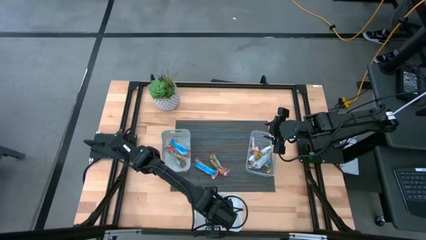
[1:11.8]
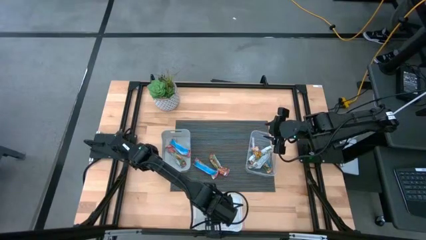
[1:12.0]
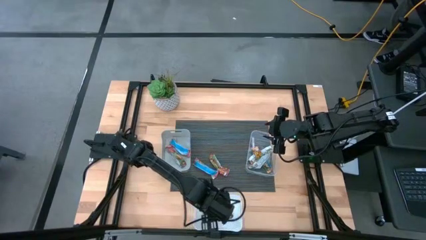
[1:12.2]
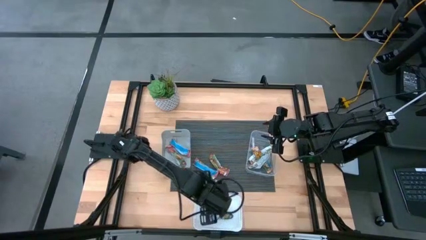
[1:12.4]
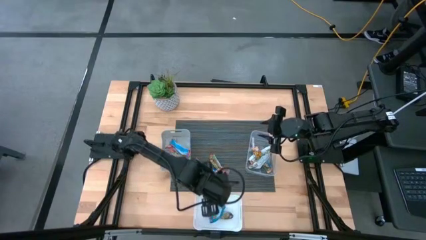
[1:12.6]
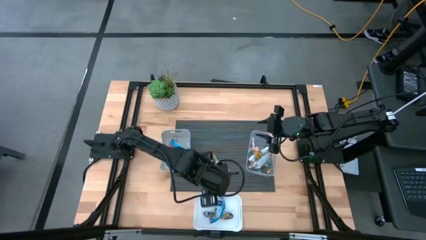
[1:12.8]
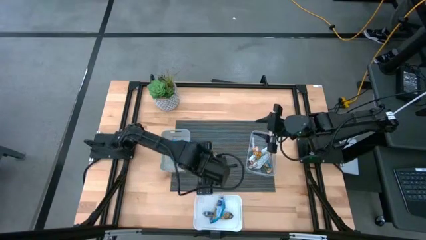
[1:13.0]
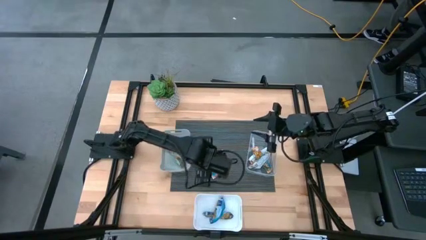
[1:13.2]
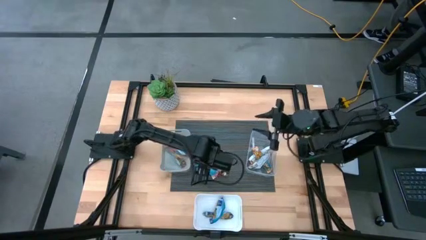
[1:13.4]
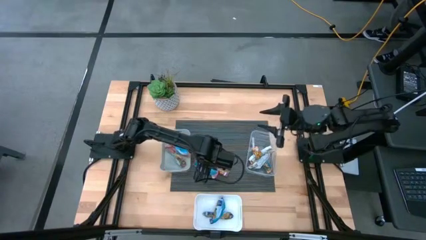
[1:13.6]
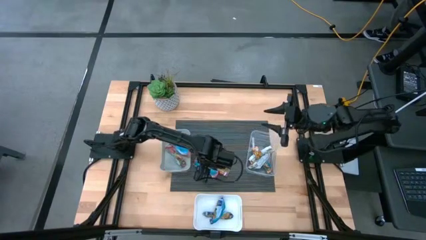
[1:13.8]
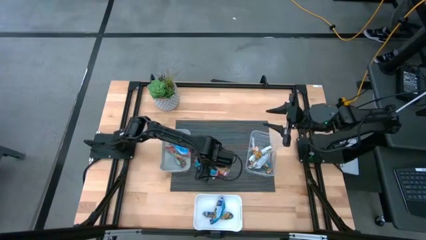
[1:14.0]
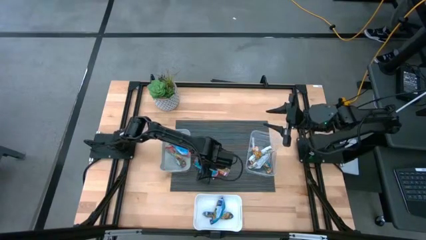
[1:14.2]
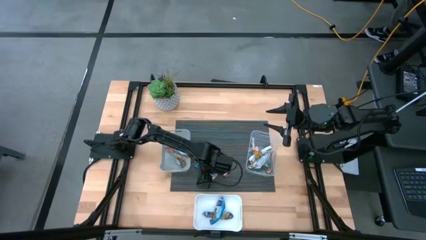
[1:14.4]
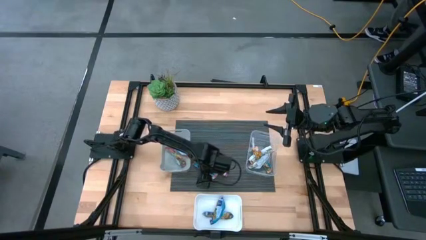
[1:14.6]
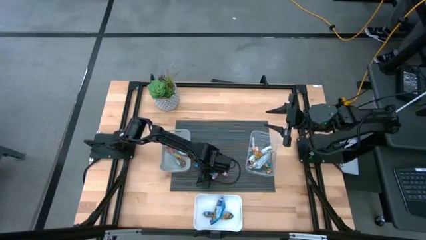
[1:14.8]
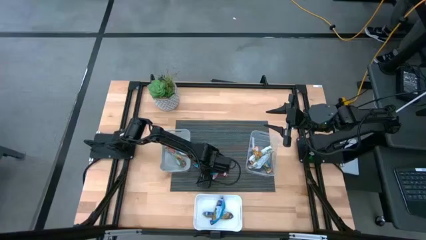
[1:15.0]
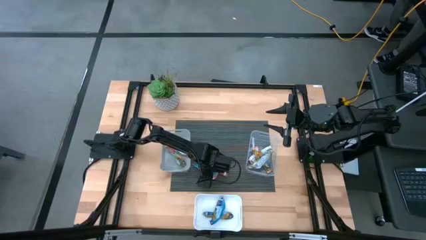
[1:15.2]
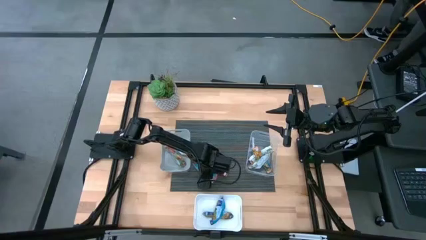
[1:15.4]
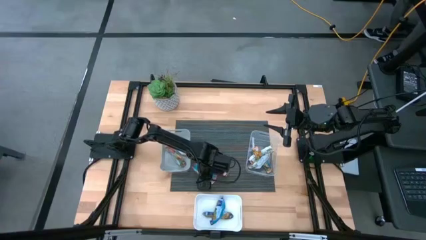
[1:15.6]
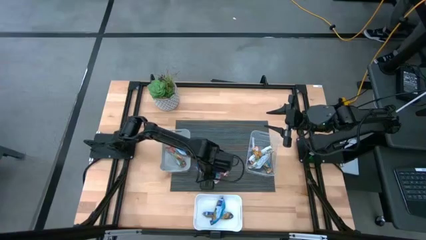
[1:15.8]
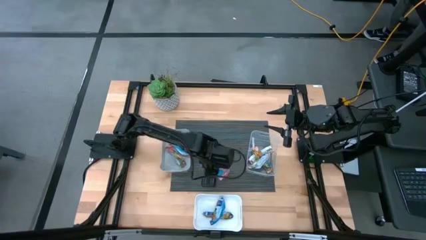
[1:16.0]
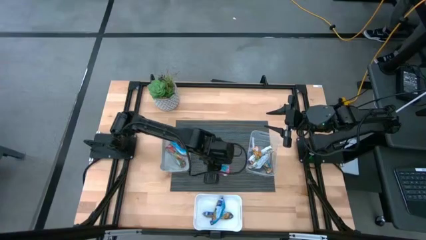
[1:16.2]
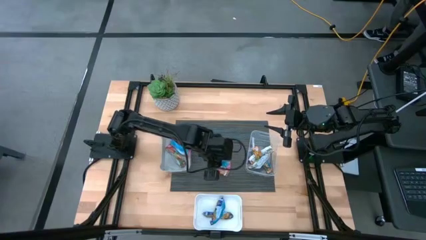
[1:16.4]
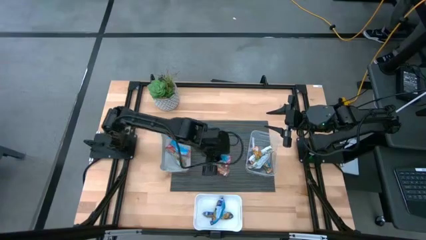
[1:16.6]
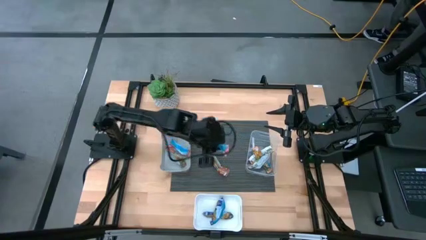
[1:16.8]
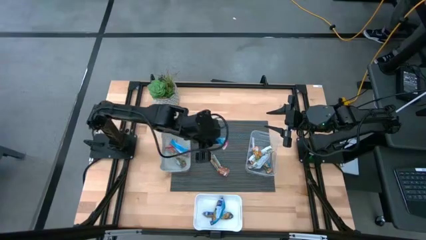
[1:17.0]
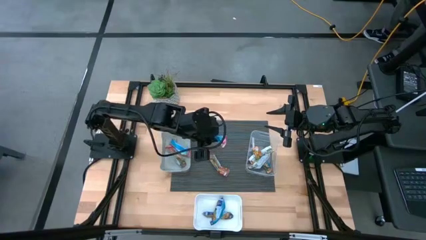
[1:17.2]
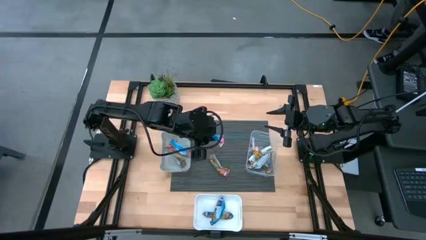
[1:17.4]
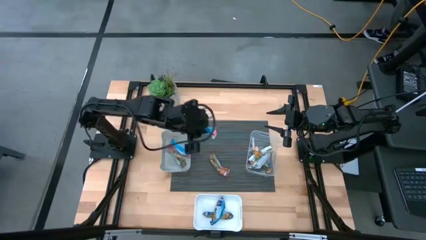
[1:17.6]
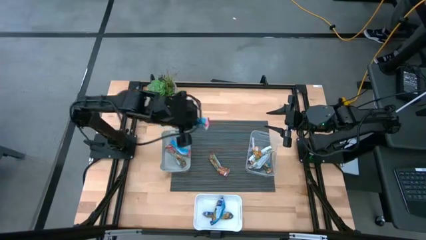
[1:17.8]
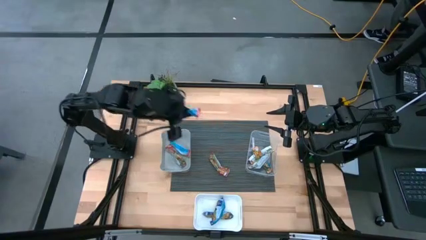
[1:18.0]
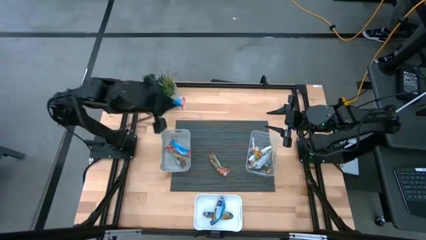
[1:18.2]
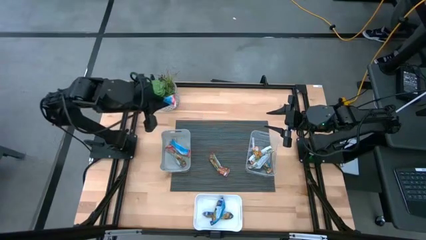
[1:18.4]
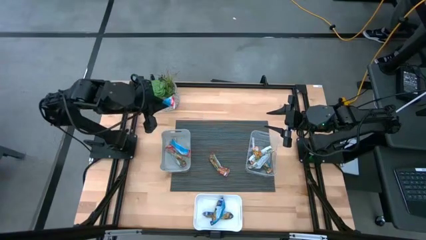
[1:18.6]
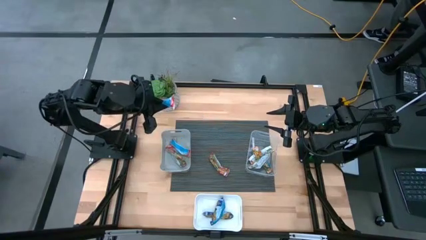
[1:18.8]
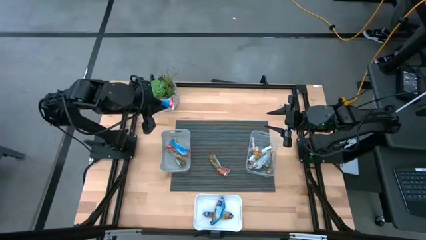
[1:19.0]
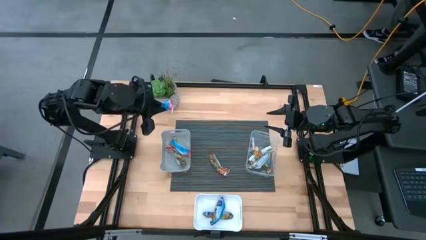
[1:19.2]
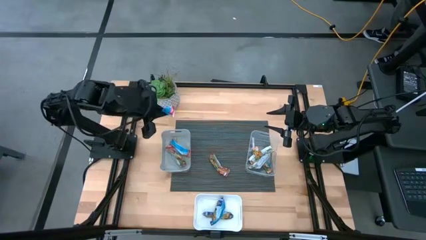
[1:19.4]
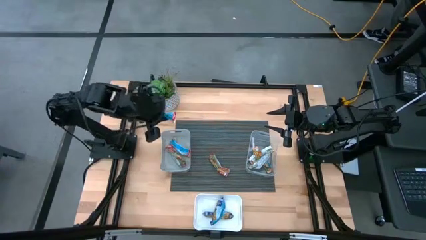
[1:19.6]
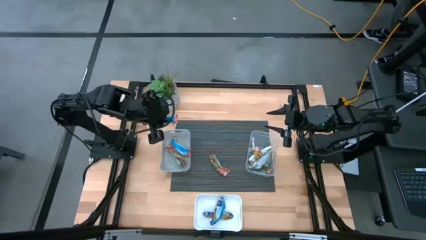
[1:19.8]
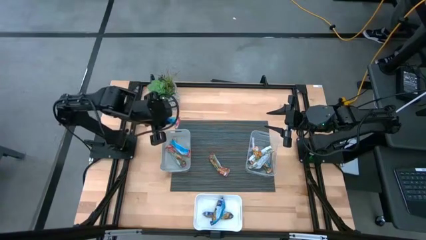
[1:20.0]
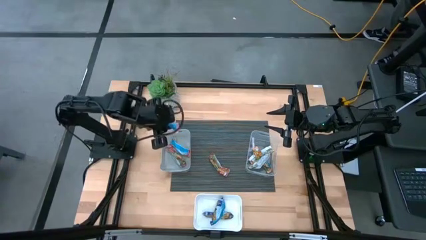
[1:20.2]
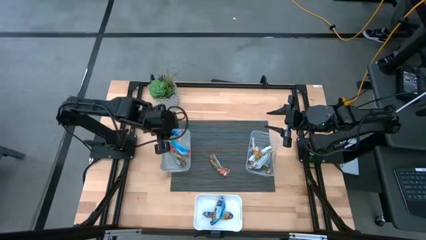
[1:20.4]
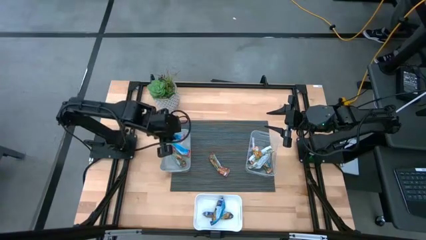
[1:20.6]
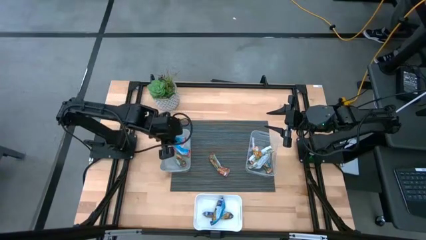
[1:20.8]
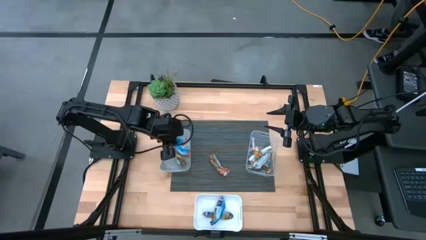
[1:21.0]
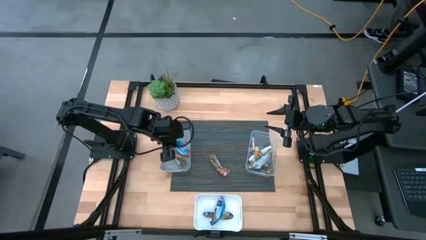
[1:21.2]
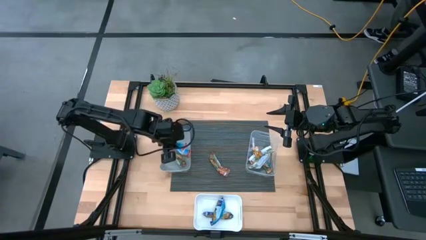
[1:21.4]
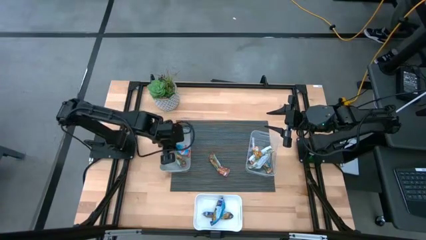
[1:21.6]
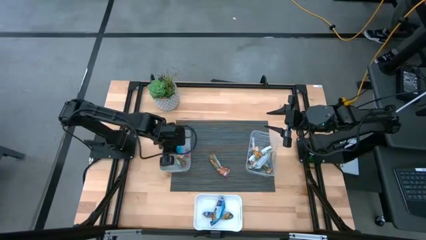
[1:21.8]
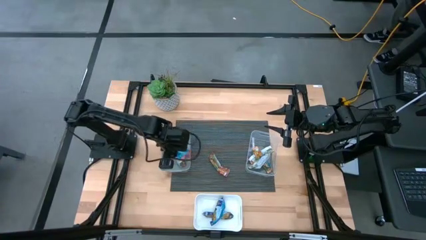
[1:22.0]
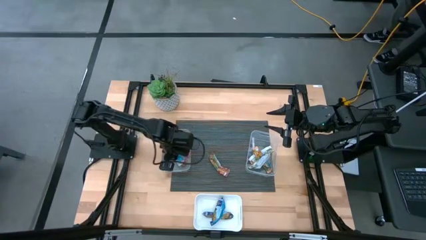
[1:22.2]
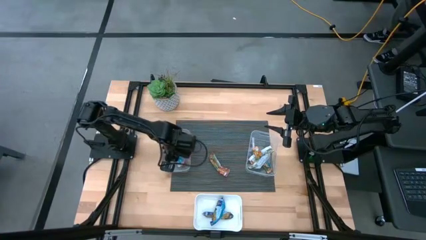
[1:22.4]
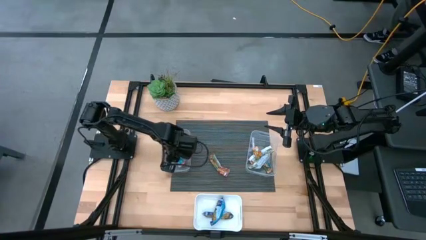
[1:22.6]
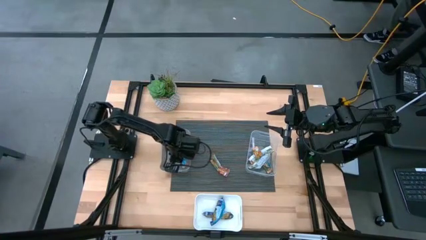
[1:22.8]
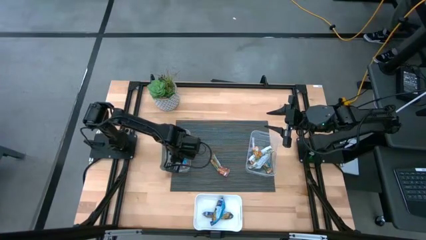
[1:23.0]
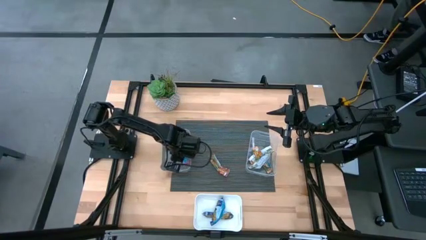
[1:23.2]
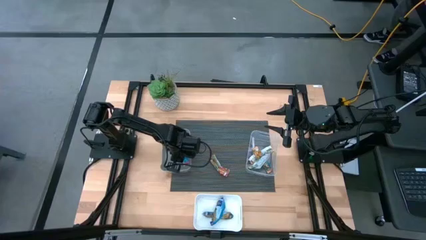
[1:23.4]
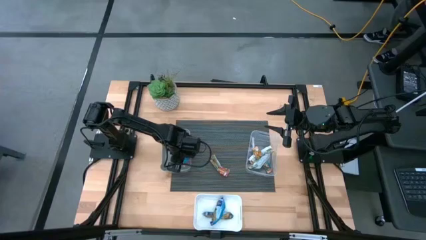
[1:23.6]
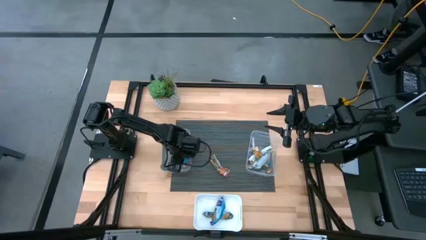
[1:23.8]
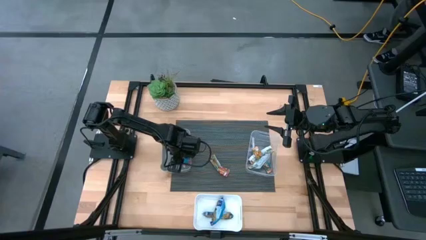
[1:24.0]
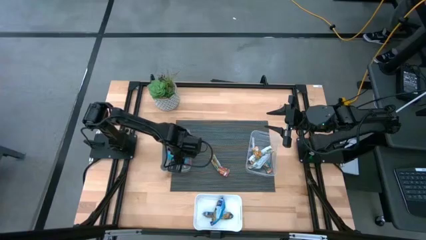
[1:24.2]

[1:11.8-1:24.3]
Task: Pick and place Granola Bars by type
Put the red granola bar into the gray bin

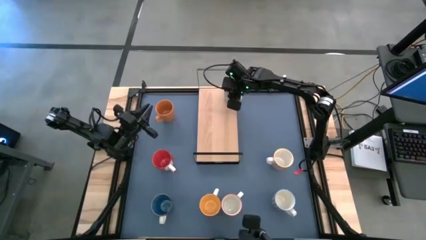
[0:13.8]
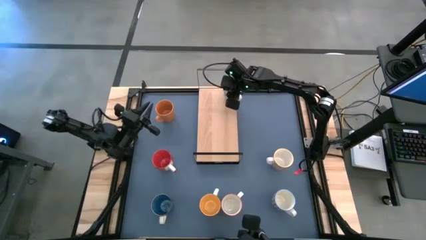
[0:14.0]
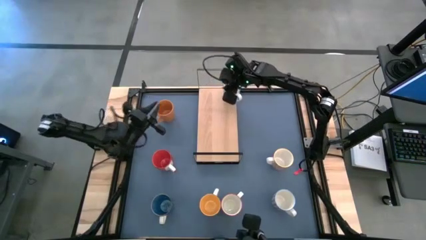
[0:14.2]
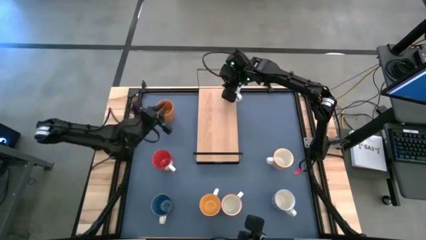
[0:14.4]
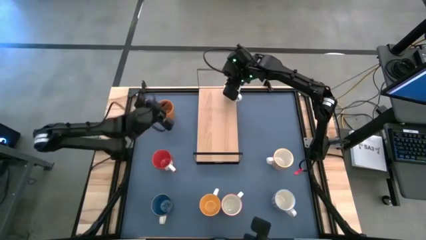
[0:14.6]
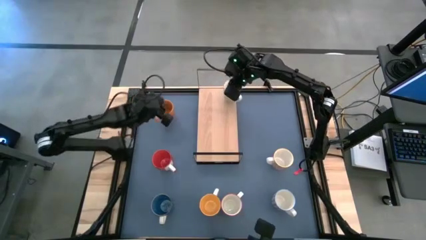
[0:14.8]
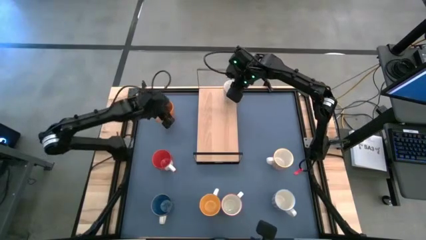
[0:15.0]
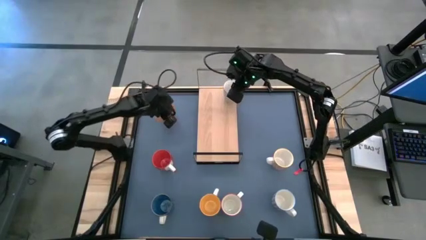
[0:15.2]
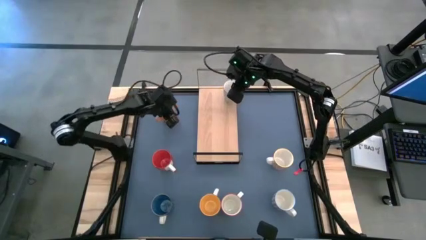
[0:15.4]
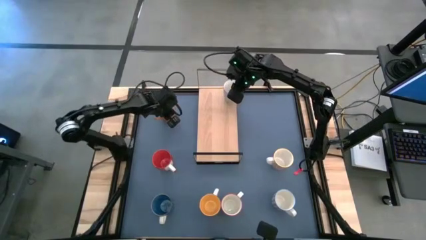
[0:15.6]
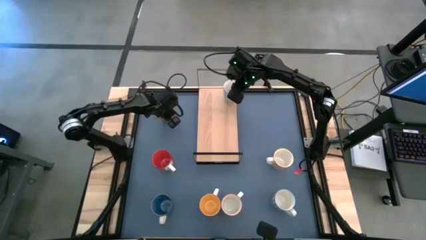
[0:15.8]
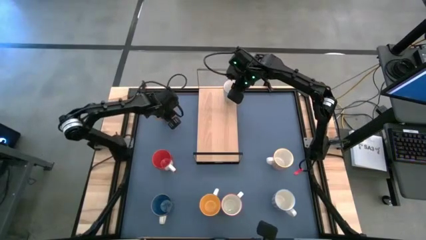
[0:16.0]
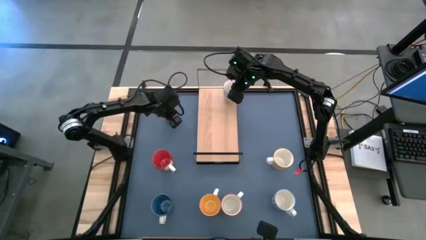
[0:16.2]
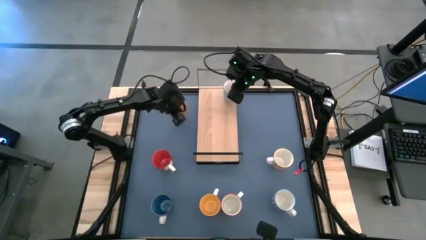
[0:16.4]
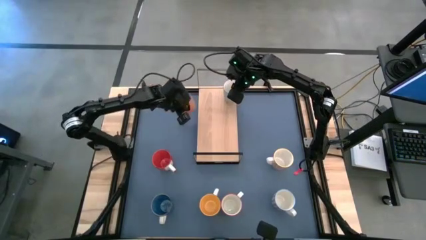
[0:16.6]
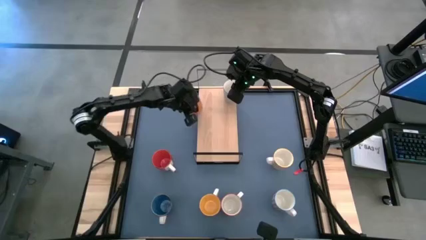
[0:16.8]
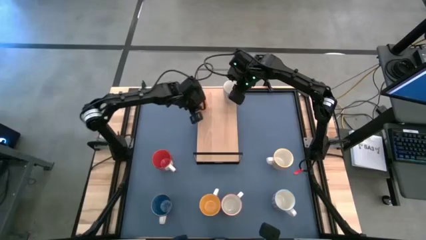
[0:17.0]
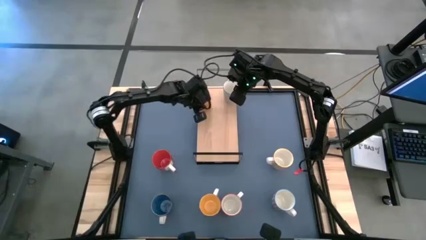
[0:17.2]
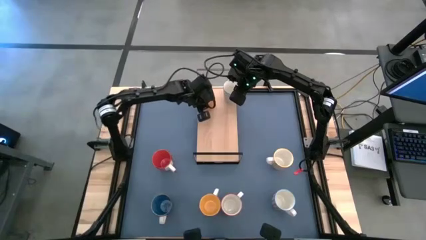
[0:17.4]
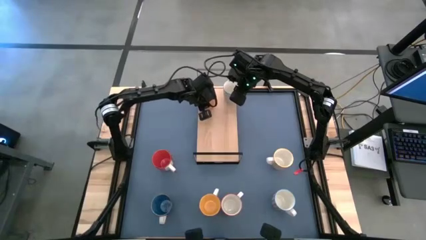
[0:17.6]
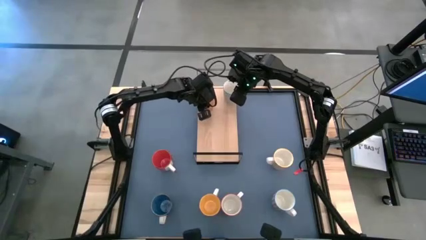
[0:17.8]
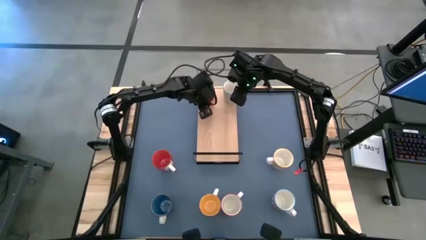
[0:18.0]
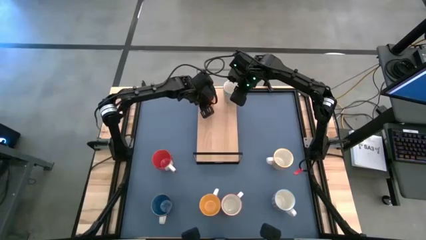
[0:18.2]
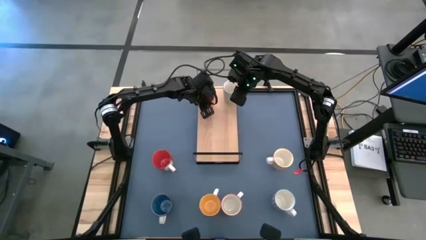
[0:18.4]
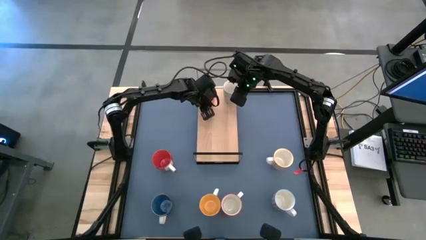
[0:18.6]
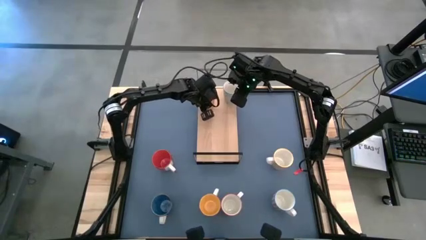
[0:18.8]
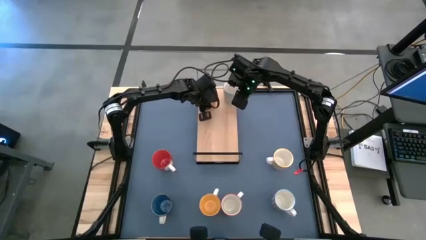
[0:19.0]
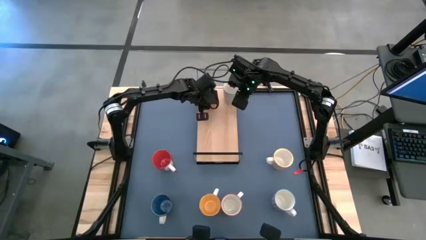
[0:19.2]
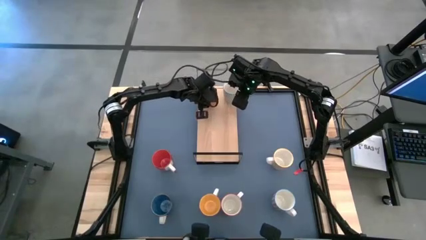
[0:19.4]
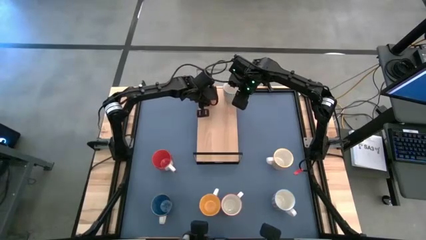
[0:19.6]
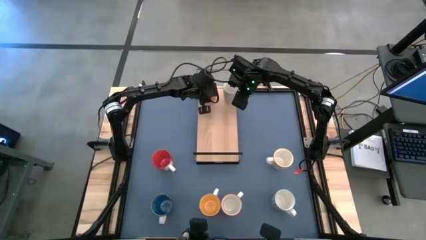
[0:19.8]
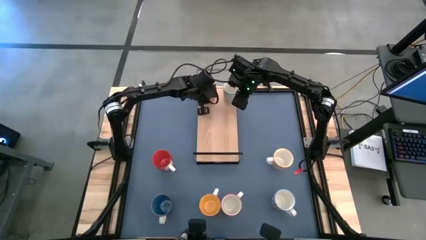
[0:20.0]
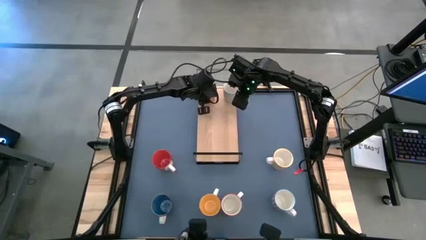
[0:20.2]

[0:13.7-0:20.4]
Task: Place coffee mugs
Put the orange mug on the shelf
